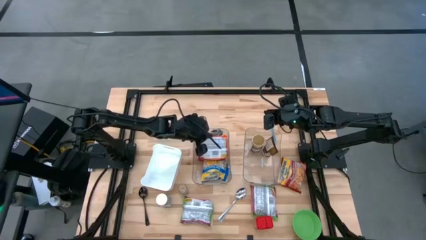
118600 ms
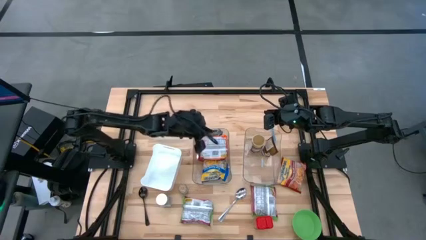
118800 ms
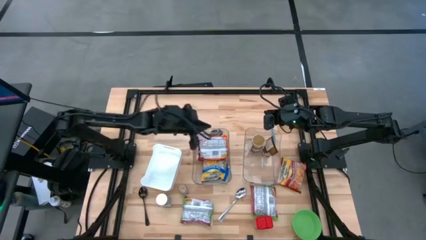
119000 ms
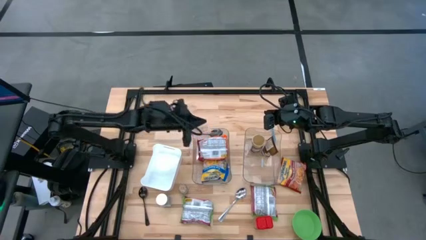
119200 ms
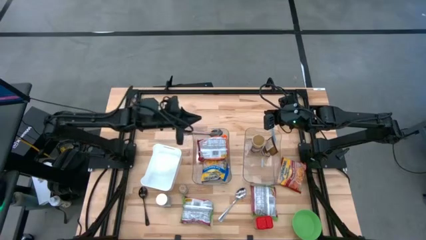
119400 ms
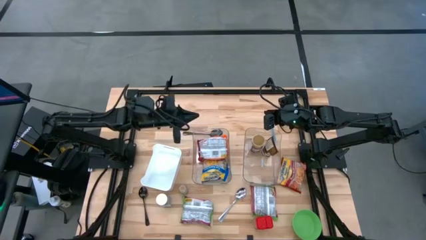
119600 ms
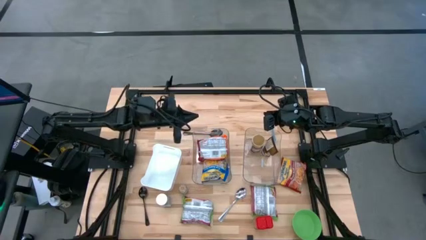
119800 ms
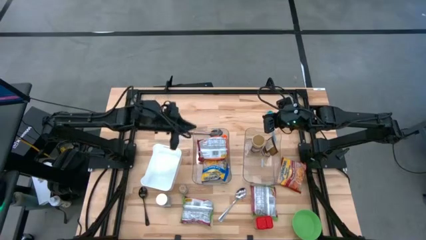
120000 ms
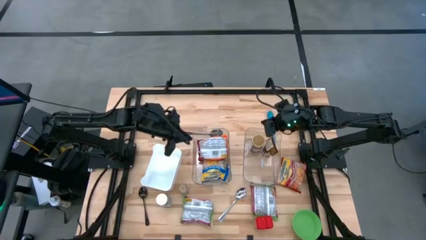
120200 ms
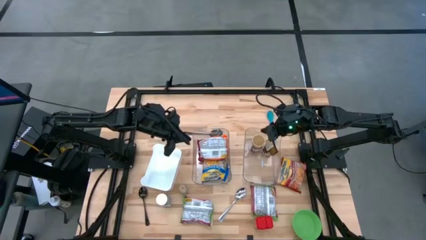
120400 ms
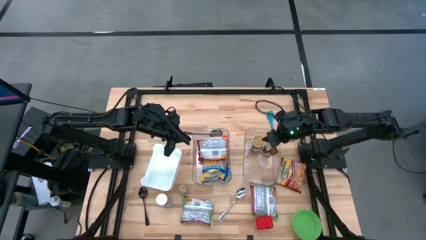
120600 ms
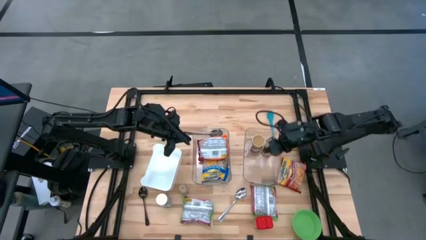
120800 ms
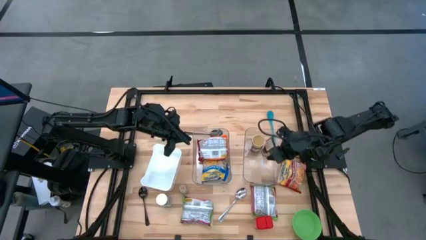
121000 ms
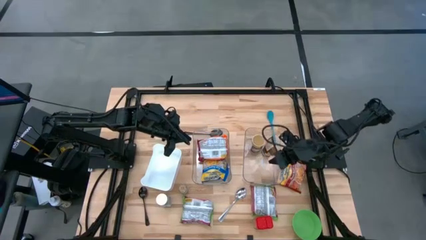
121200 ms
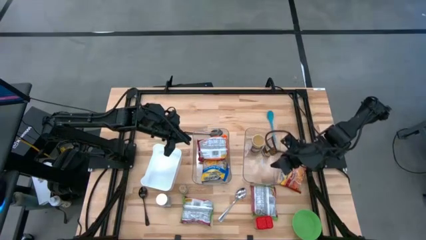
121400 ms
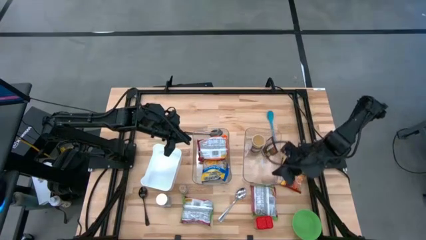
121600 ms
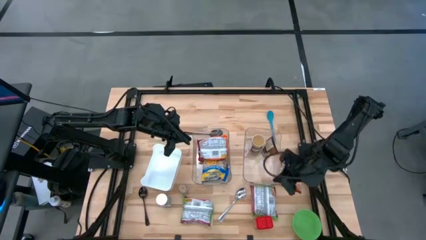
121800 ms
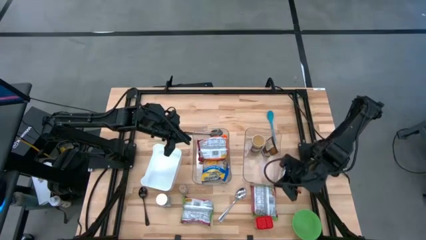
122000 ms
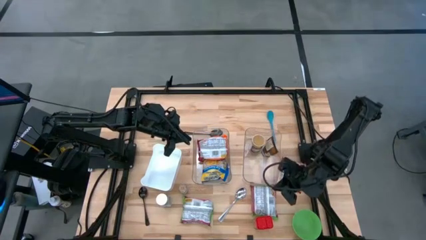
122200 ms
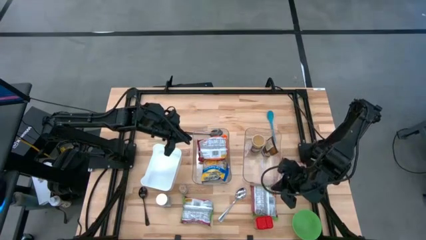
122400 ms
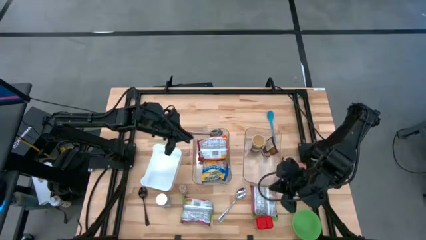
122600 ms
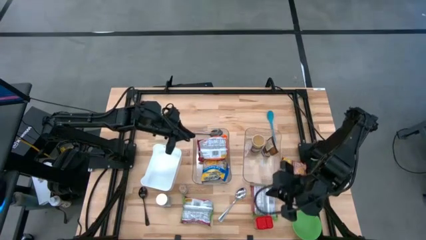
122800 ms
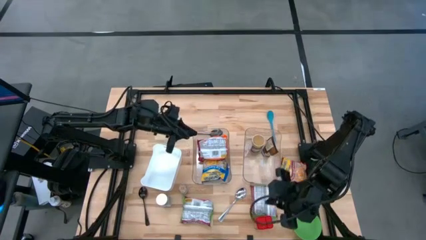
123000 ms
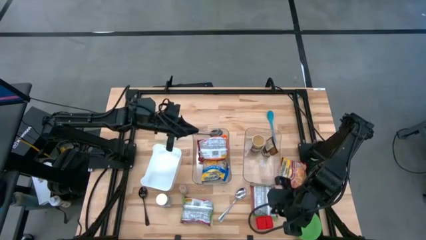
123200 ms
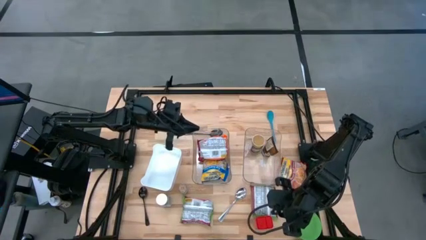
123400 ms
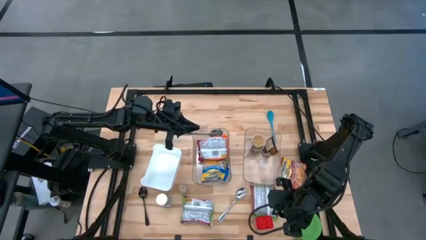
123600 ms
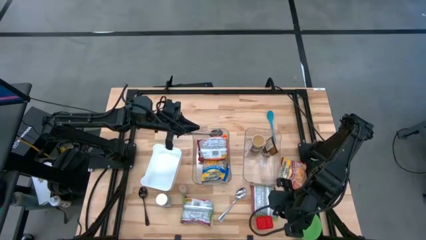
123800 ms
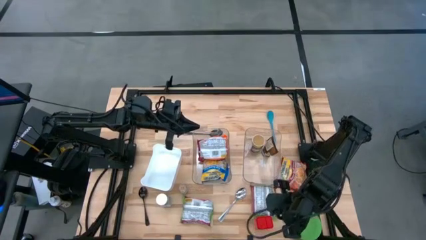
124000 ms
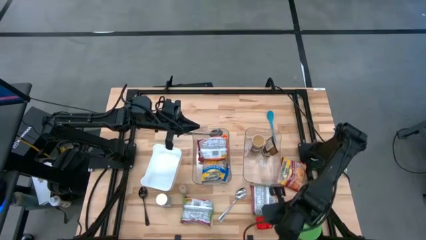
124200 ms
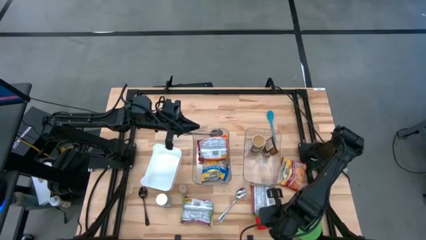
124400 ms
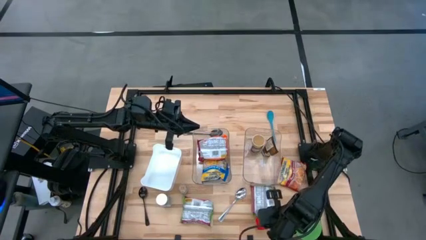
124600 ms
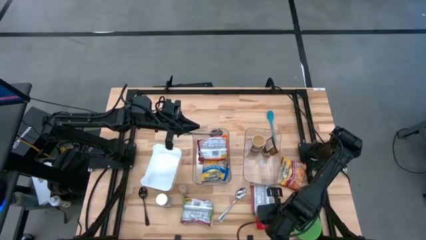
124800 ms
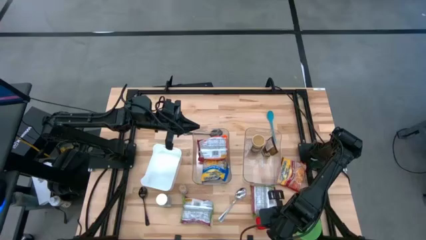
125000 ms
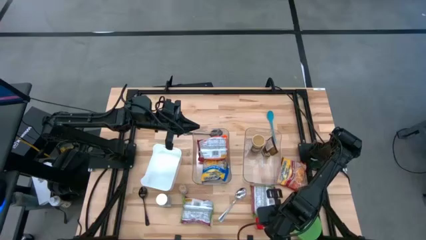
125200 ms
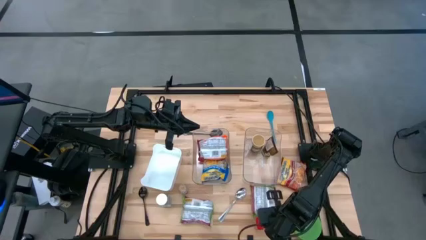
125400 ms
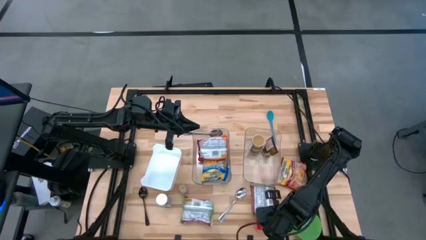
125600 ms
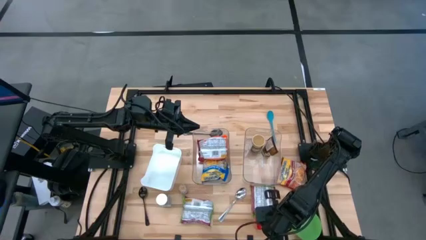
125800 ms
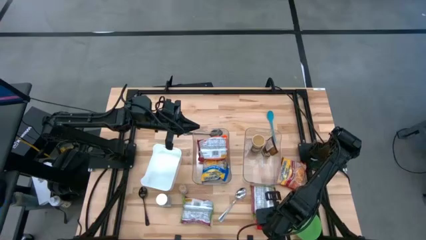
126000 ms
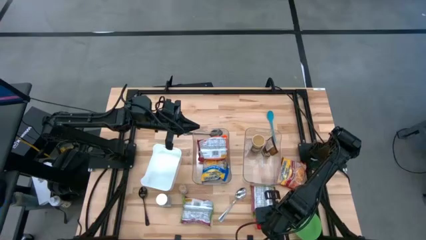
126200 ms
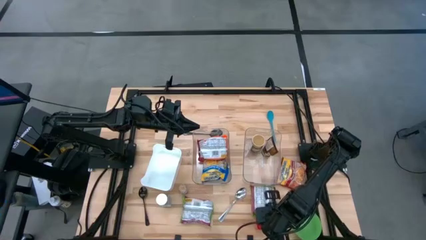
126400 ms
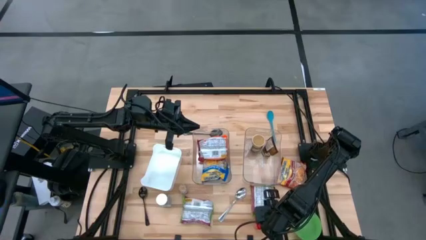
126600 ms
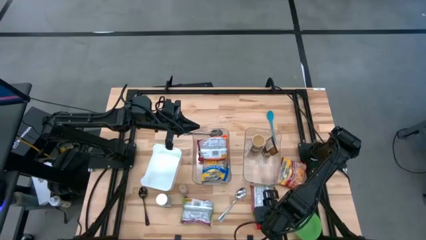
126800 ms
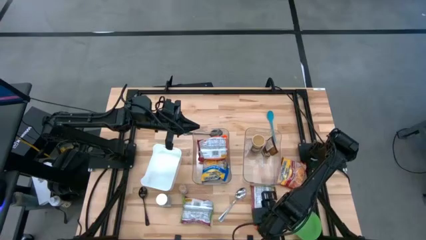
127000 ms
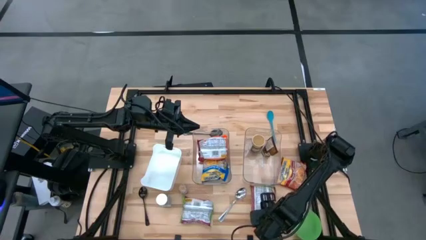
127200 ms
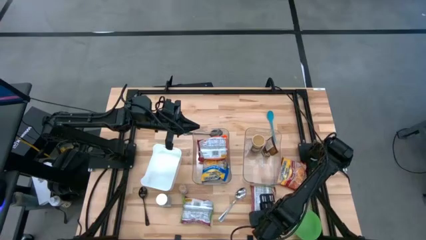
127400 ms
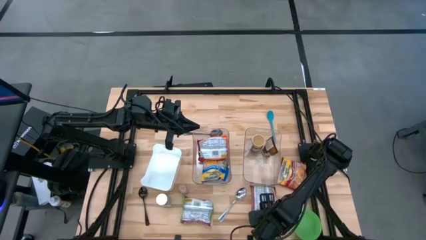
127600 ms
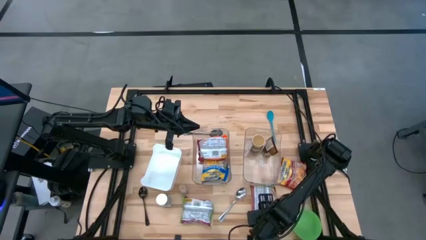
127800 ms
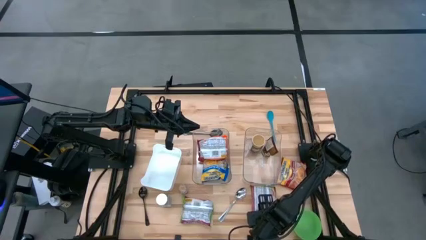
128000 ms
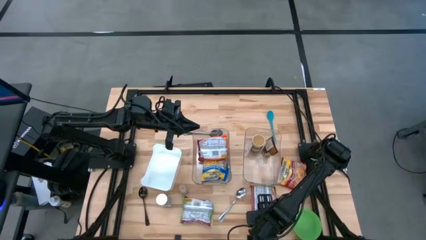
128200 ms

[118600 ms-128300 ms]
Task: Pick & Place Food Item
Put the red spice can into the right transparent bin

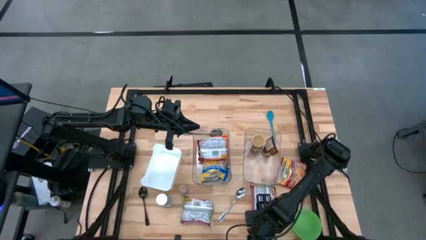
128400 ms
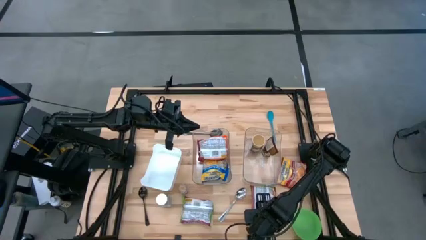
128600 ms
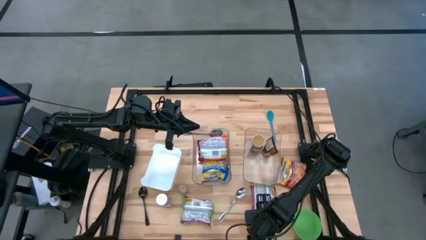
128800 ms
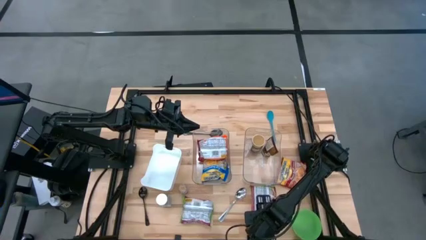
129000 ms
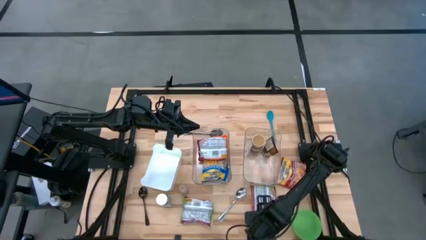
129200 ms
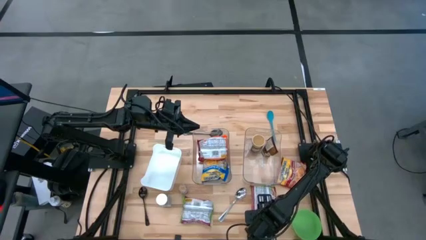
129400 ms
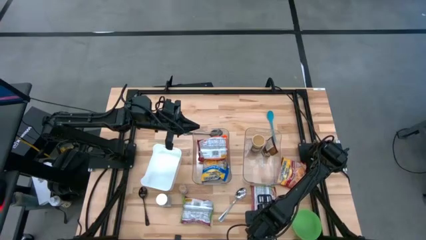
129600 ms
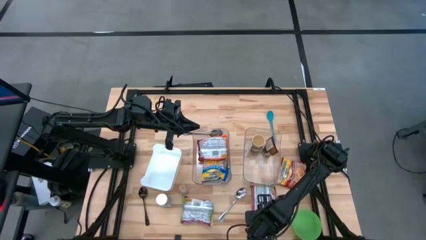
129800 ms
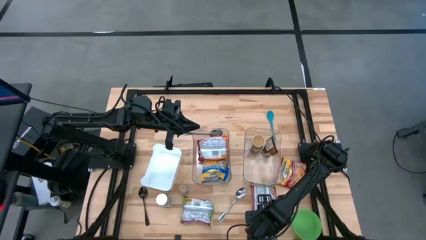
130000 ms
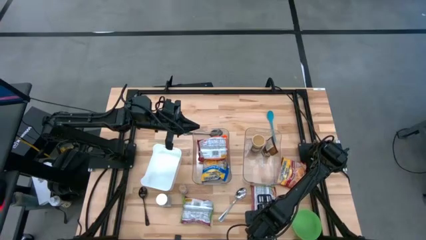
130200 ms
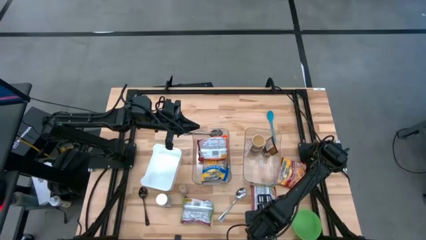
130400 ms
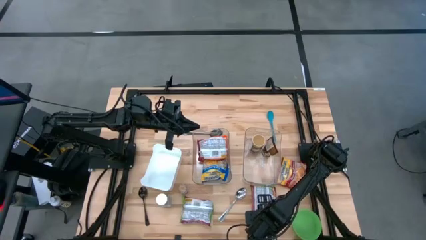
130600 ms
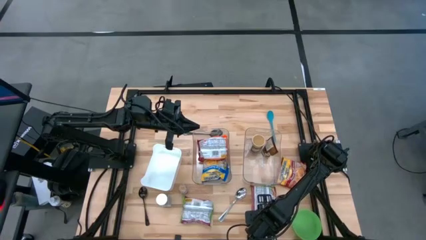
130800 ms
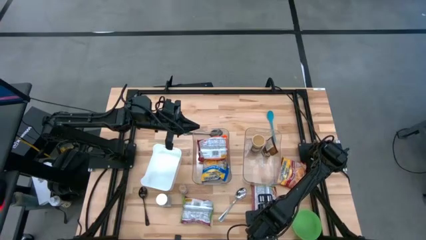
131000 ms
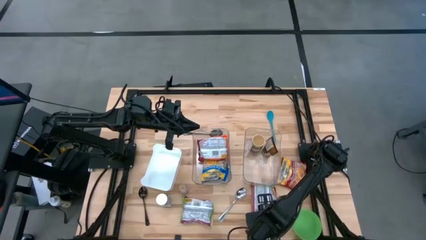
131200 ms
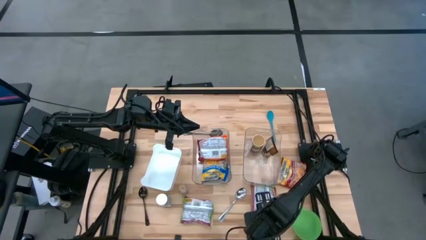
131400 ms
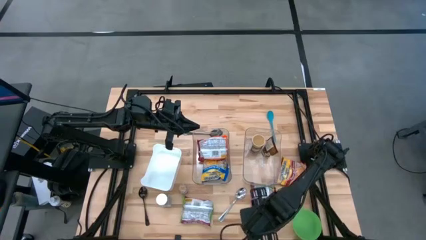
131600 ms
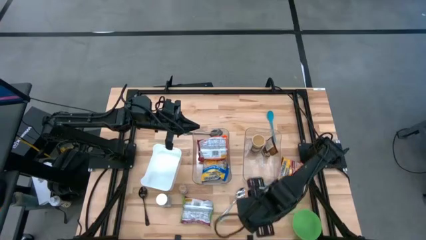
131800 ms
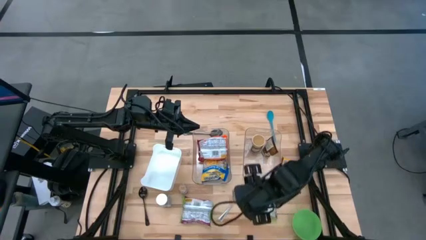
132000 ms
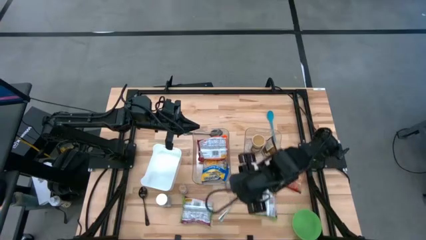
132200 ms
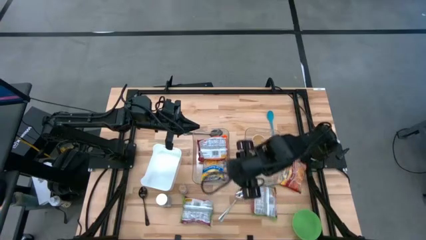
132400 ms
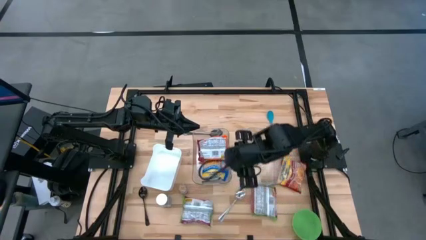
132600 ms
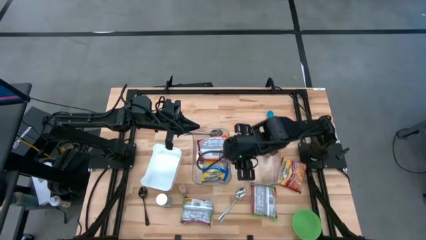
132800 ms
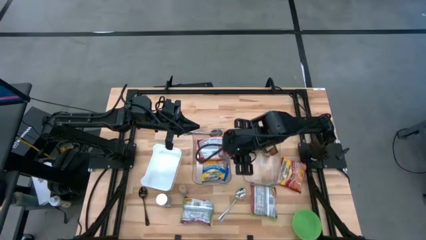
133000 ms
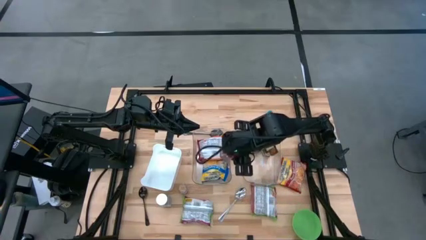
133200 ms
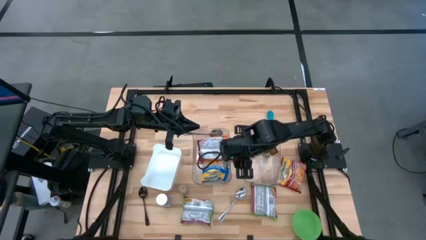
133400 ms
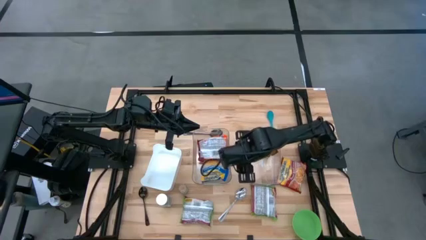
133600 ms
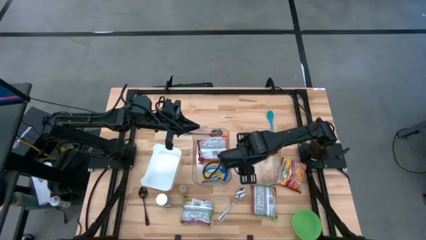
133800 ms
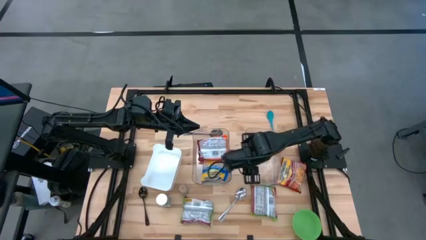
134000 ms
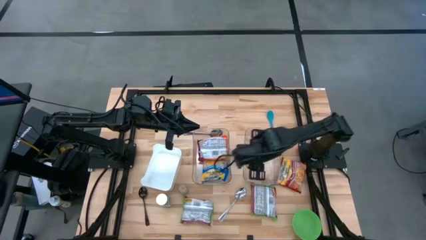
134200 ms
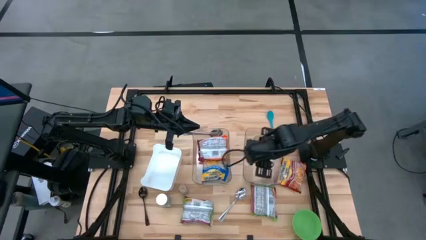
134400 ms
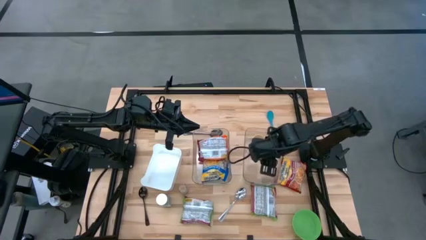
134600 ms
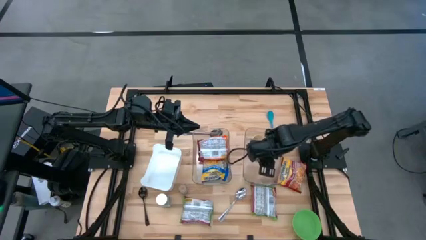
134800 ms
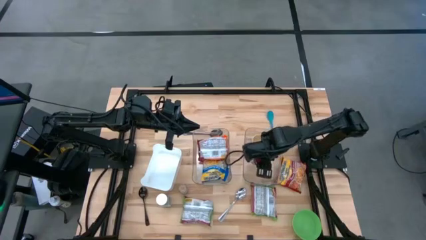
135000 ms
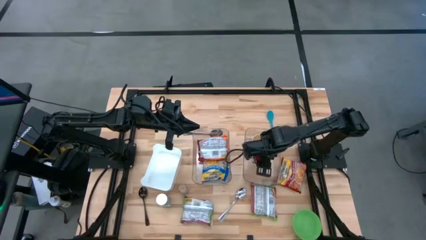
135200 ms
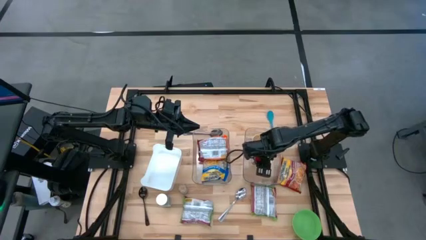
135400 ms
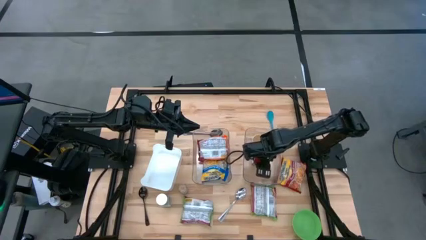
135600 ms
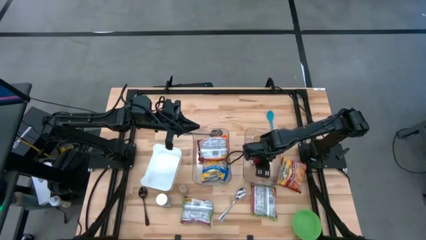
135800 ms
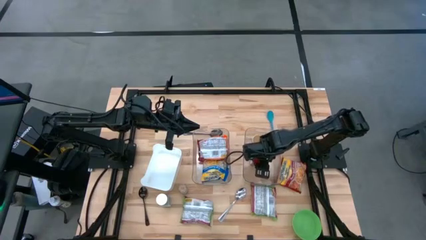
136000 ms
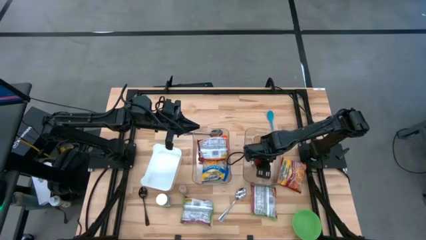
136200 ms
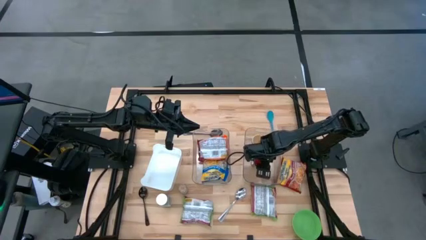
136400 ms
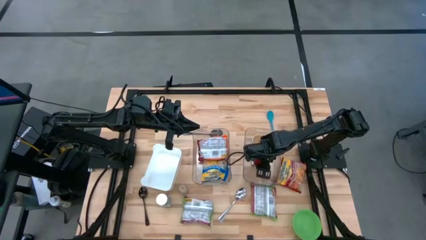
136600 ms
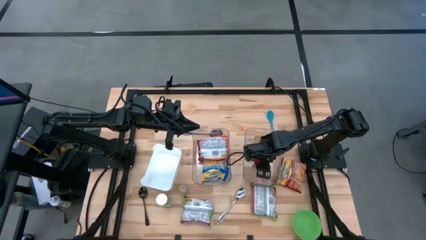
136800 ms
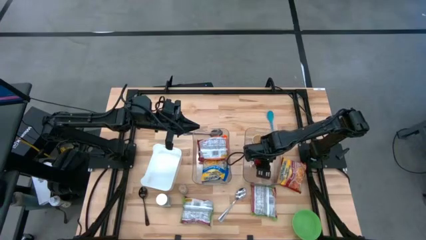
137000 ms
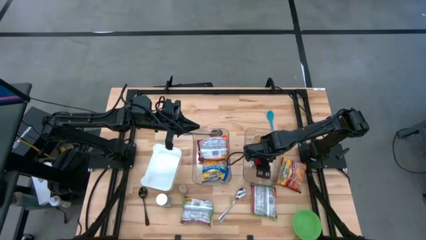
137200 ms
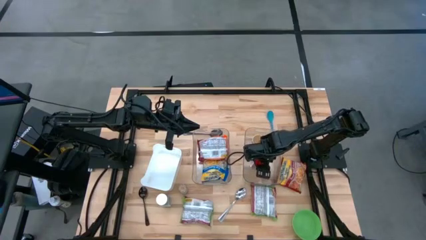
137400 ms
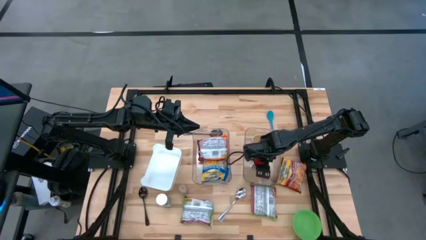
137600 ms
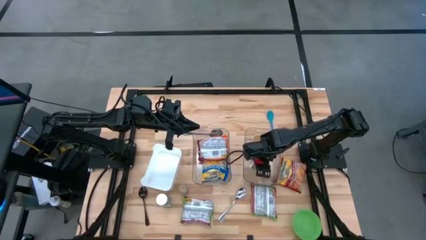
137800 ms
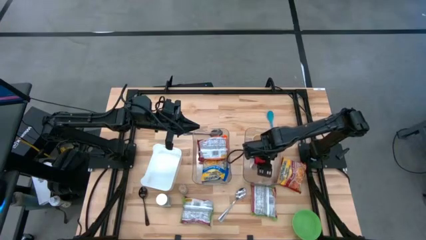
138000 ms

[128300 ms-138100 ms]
Put the red spice can into the right transparent bin
